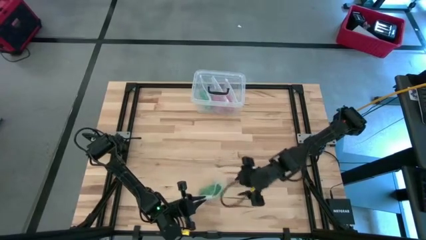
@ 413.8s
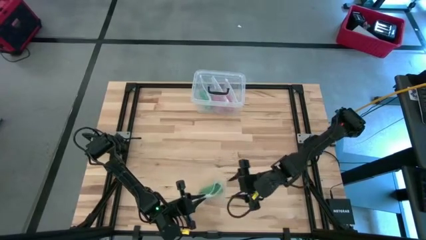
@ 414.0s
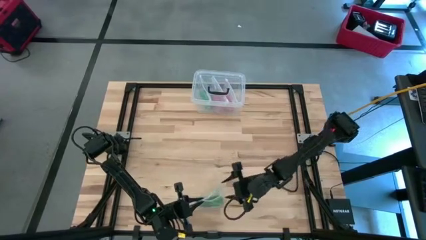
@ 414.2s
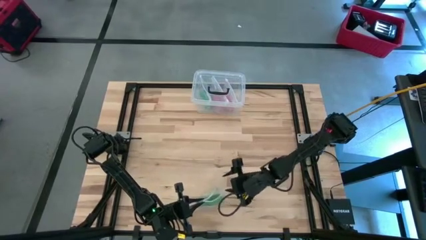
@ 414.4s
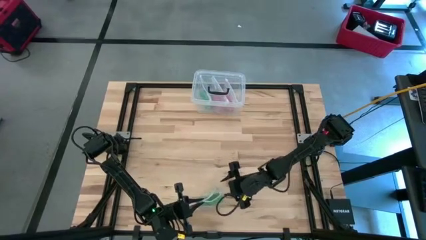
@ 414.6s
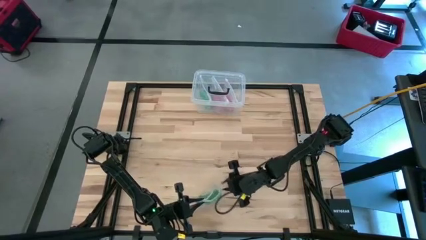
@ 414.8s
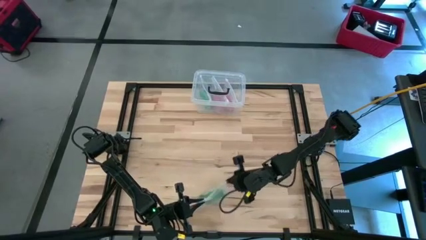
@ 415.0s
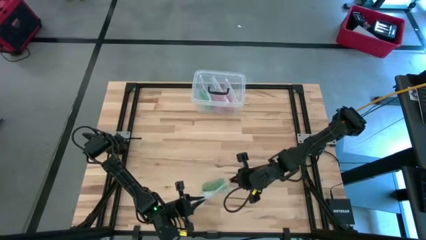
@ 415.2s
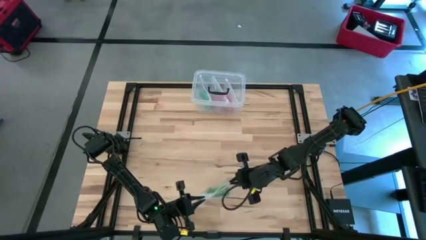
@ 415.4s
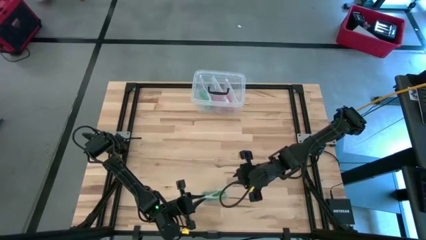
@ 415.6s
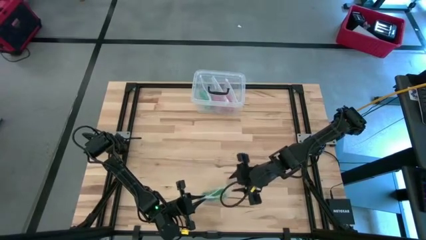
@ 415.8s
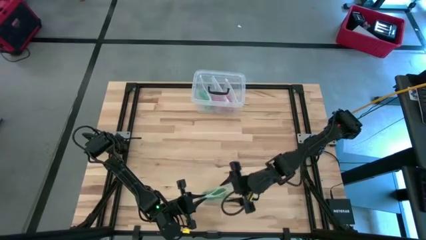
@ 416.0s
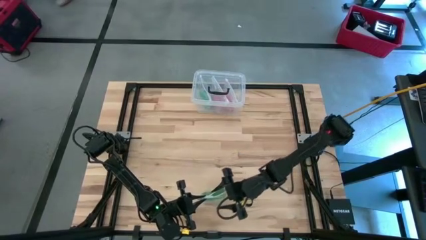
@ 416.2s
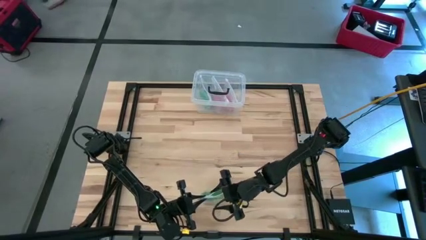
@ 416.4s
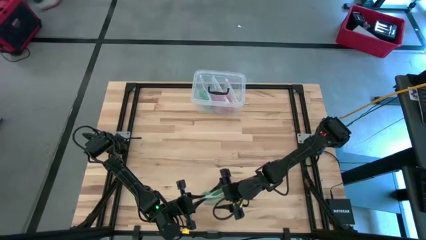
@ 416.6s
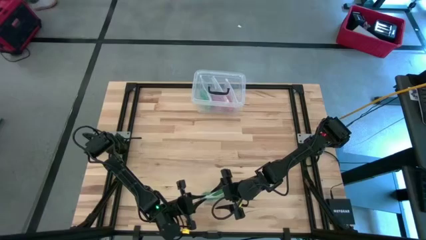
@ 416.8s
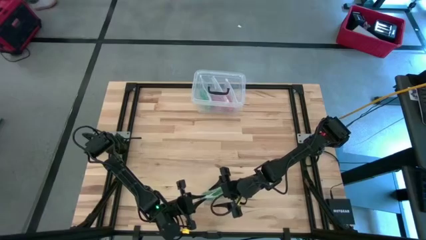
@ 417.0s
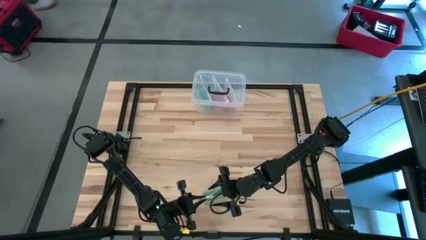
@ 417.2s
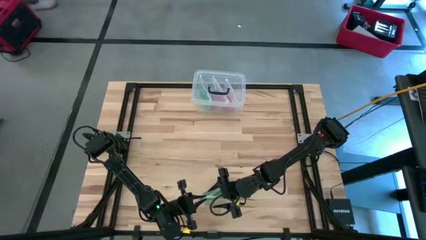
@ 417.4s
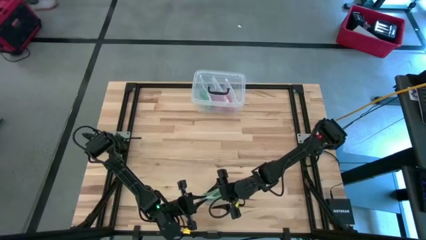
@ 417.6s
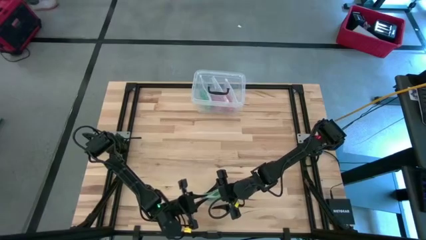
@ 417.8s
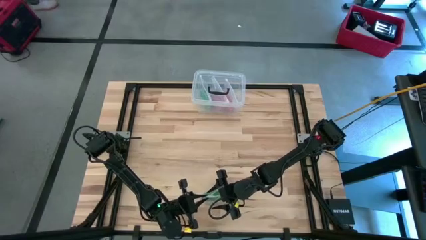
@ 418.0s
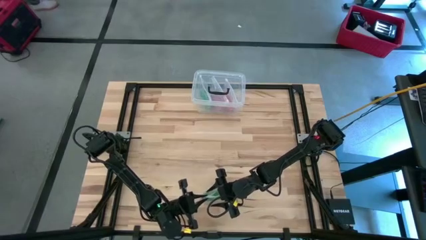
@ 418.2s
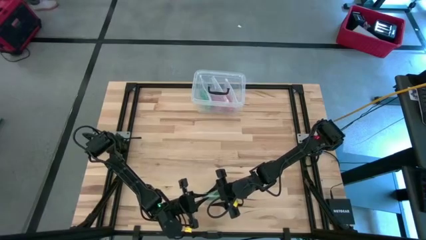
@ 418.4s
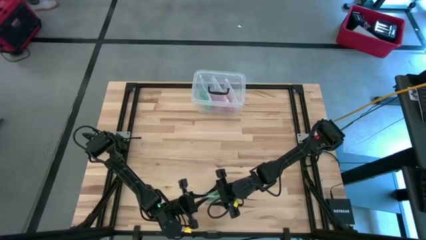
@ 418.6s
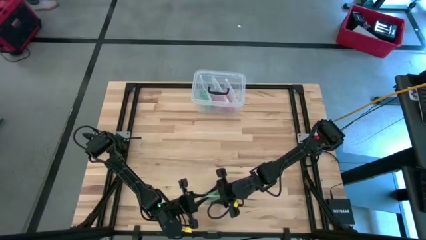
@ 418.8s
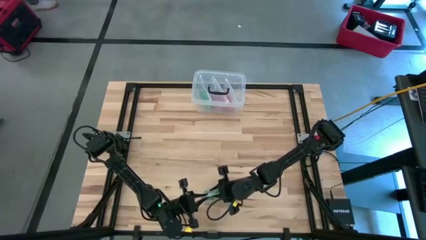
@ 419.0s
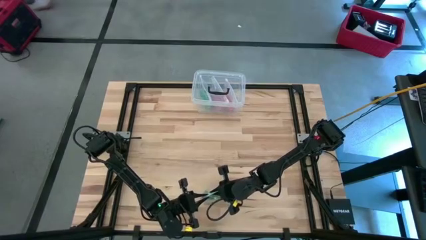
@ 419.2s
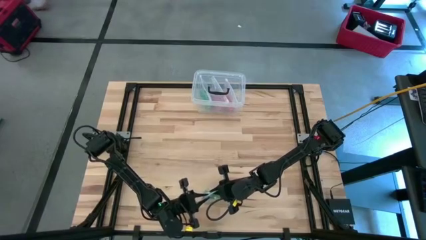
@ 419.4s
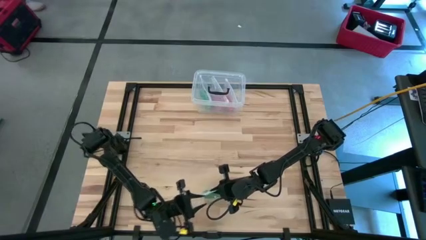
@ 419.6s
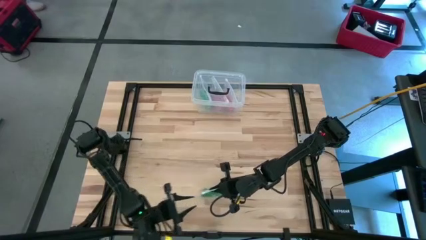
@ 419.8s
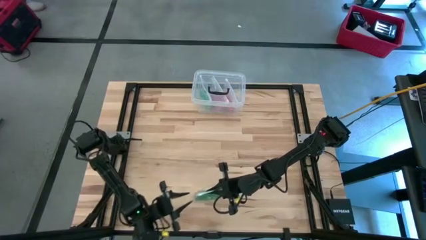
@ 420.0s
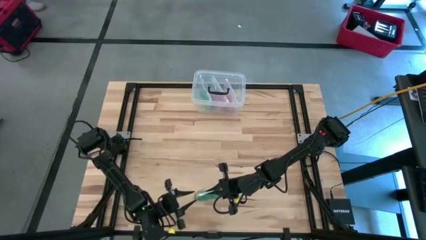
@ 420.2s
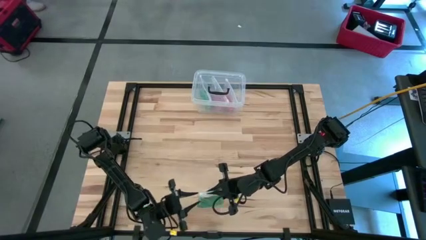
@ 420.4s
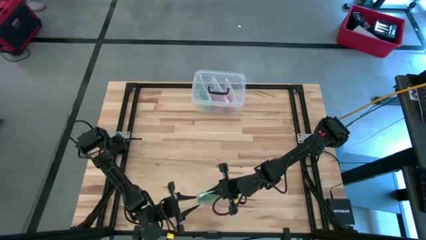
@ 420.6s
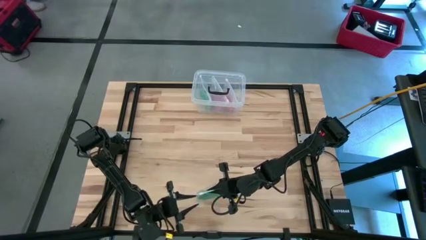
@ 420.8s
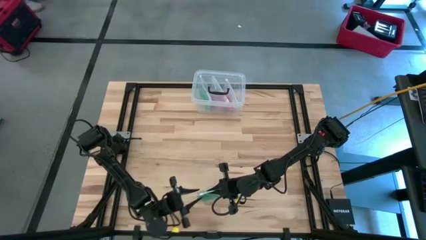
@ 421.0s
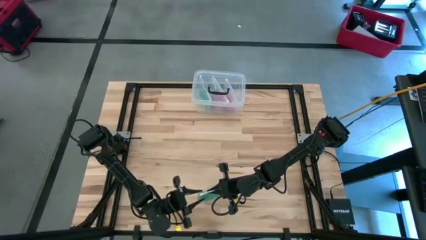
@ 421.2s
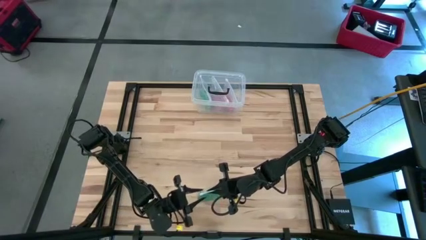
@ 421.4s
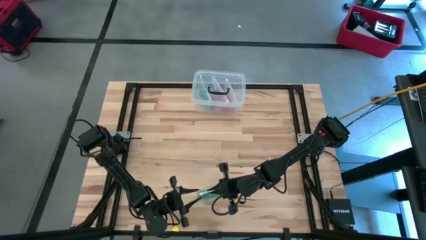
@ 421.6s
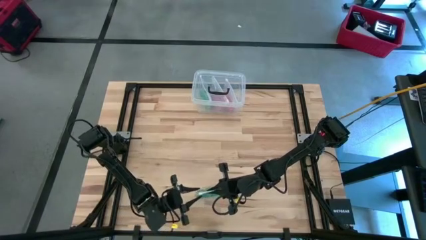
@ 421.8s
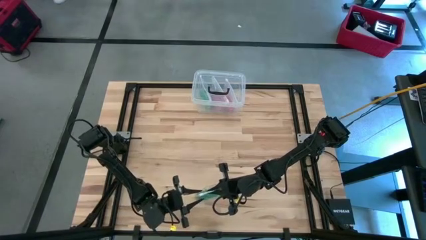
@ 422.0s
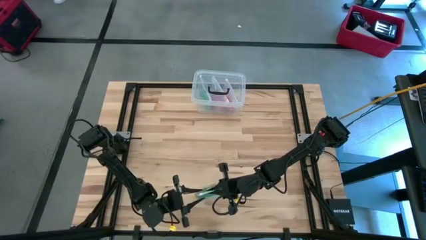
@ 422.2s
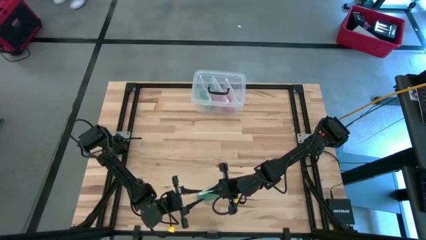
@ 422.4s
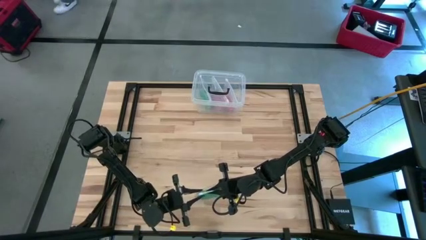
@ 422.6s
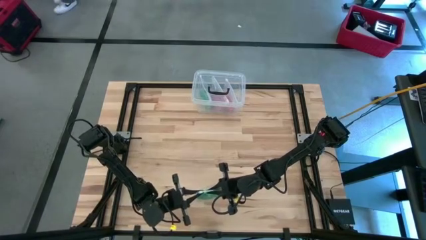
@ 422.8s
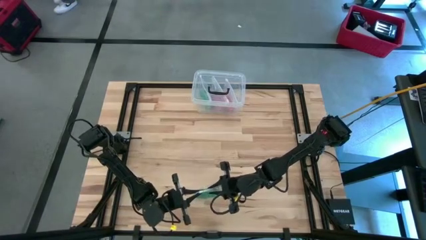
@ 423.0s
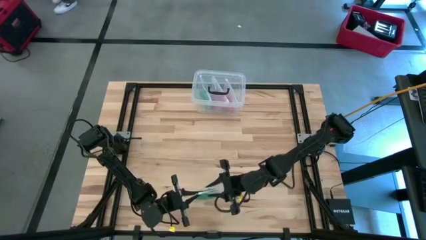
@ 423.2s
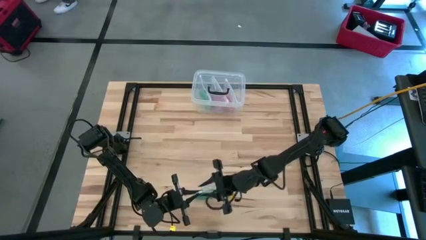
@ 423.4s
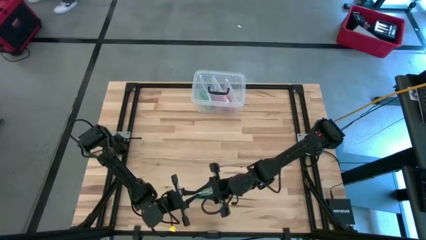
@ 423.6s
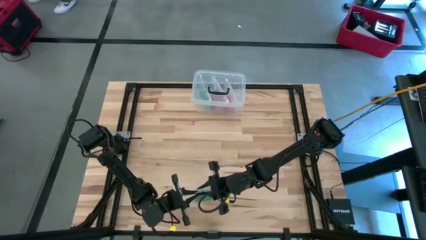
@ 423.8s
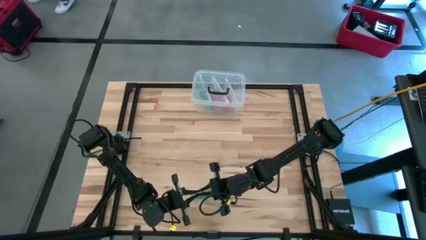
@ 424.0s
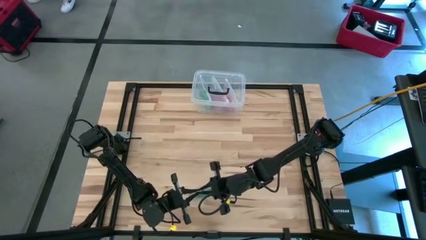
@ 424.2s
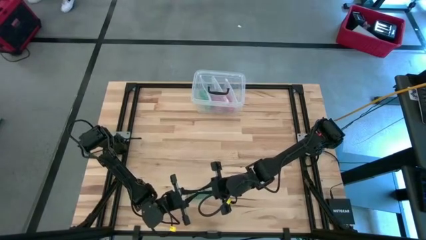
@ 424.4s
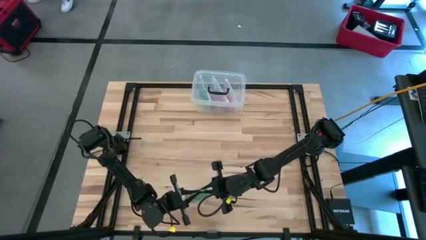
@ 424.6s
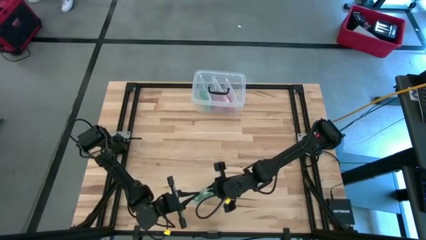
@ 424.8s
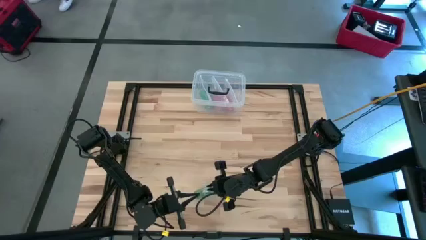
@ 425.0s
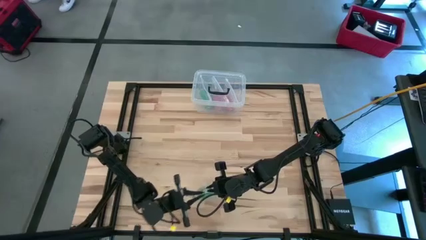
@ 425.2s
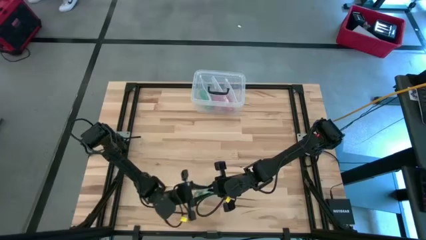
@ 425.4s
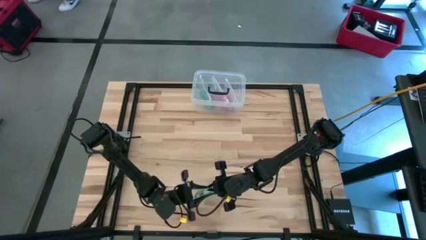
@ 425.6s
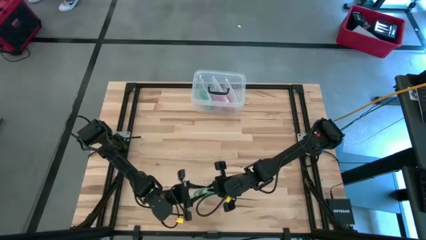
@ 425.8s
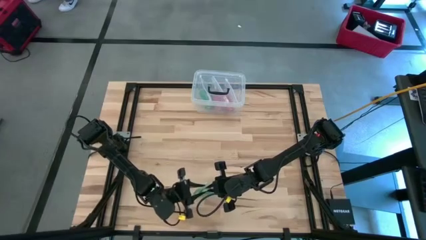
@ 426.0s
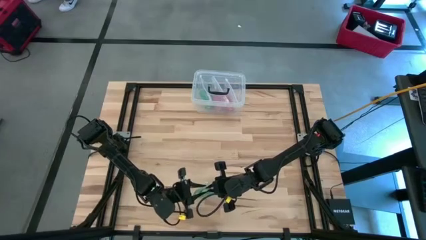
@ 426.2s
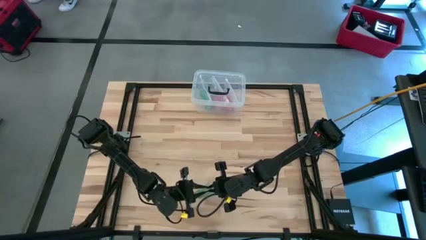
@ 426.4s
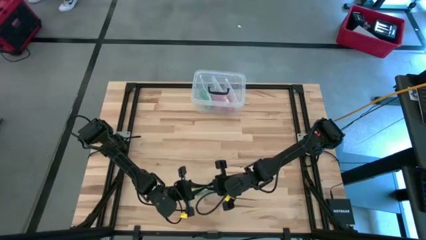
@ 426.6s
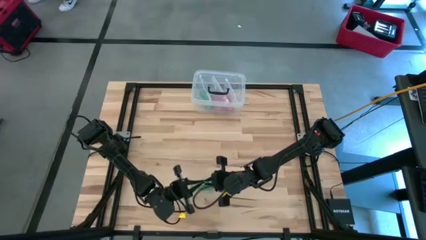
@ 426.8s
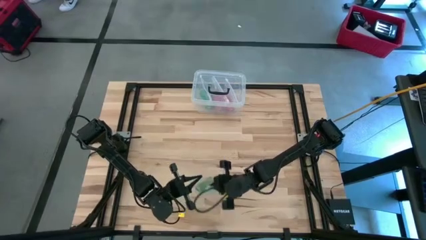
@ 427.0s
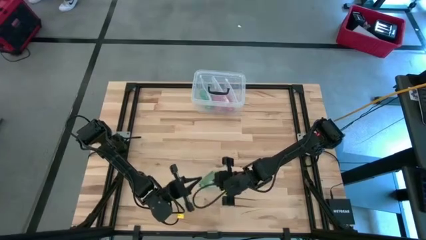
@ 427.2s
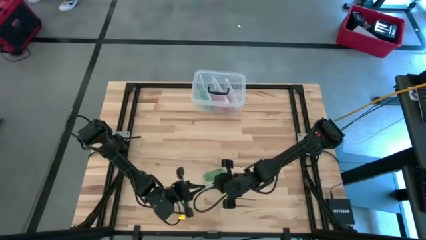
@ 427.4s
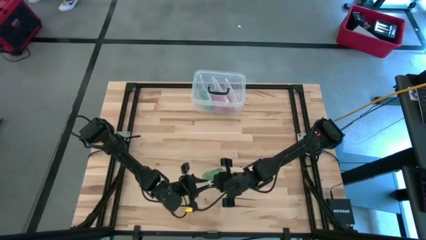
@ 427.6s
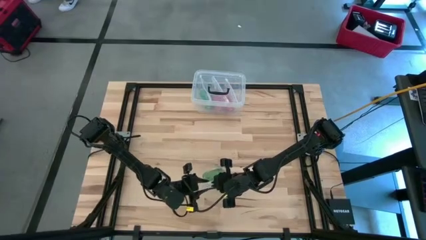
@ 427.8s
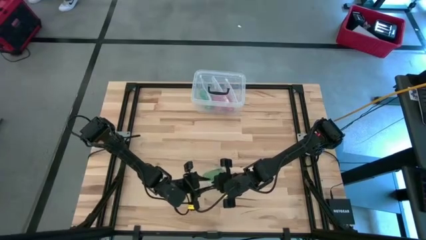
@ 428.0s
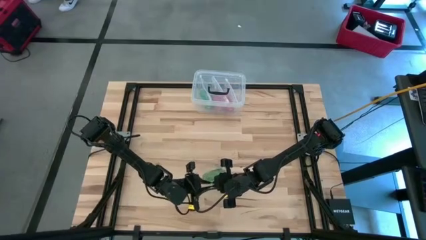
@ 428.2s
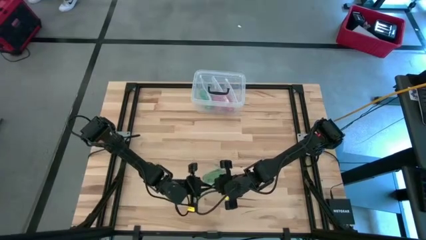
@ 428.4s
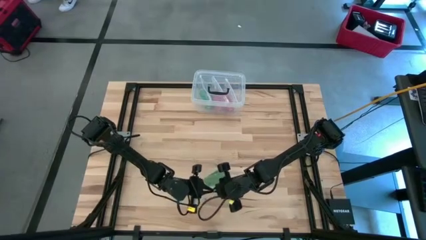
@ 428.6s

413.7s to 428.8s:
Task: Roll bandage
Close the transparent zip lock bag

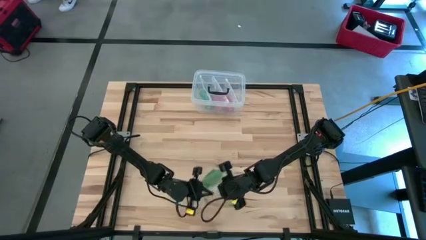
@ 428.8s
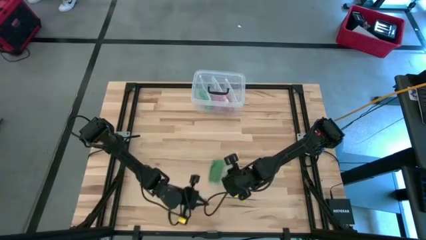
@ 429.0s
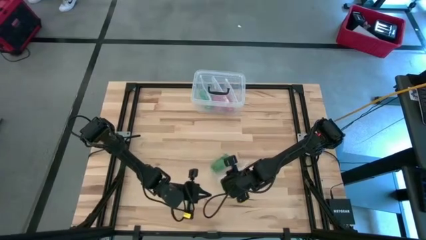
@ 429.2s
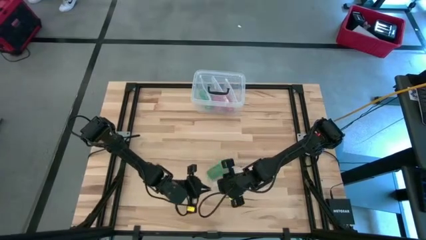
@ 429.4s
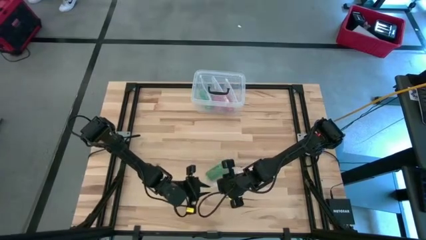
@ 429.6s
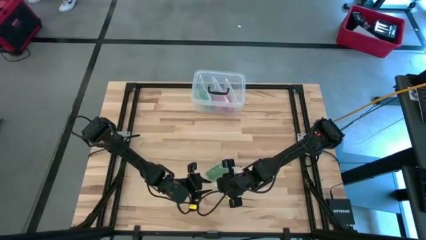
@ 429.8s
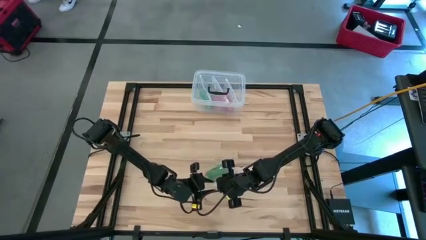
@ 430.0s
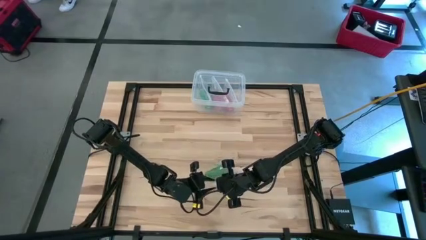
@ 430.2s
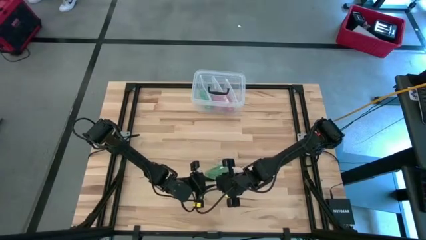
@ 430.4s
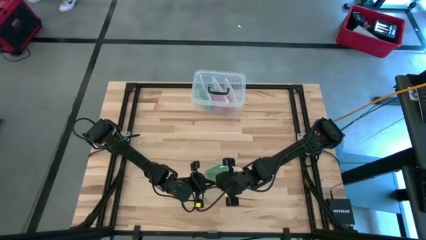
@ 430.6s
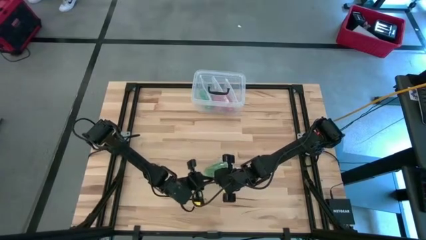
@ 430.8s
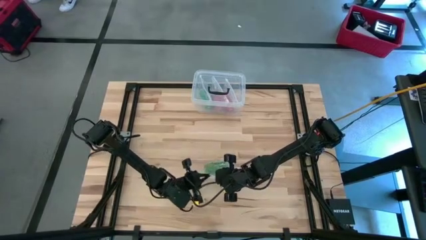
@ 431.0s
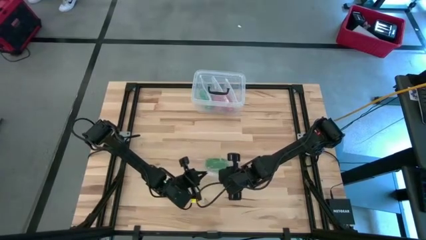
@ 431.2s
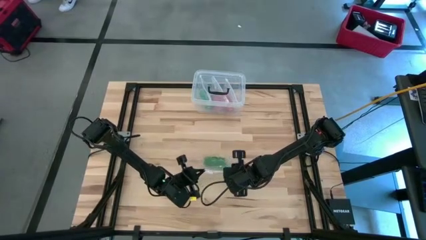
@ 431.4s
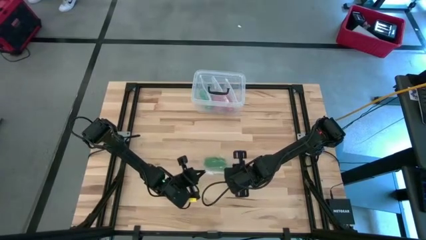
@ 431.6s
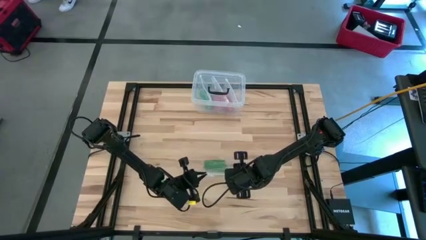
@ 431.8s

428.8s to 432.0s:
Close the transparent zip lock bag
